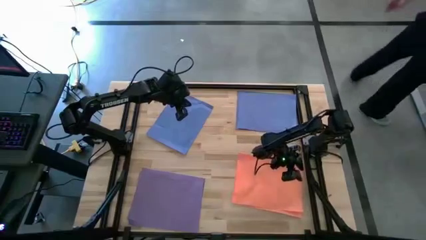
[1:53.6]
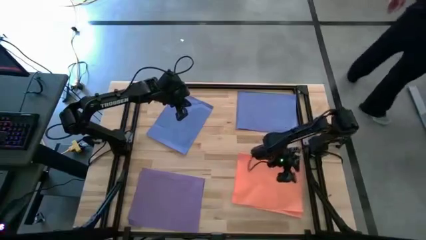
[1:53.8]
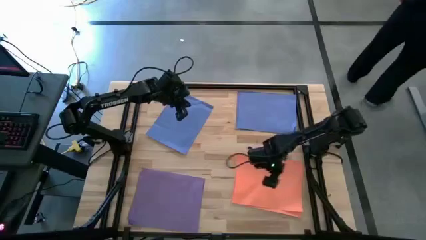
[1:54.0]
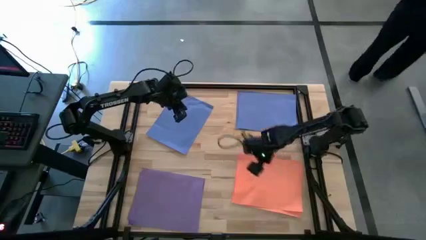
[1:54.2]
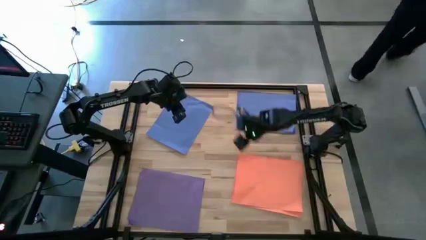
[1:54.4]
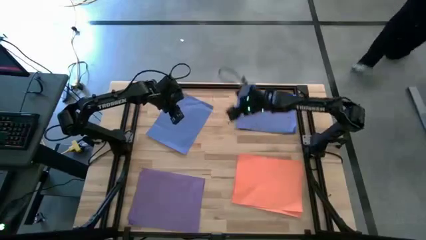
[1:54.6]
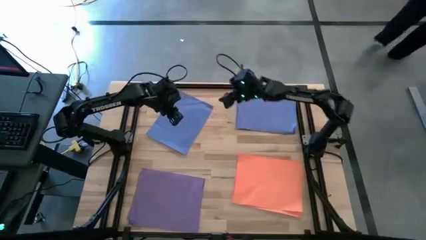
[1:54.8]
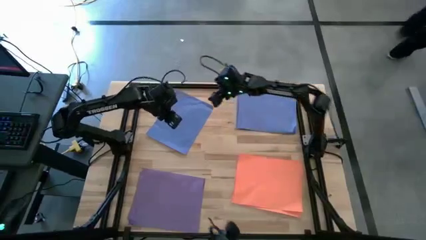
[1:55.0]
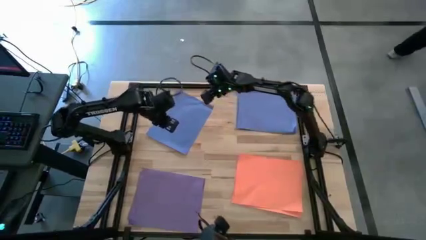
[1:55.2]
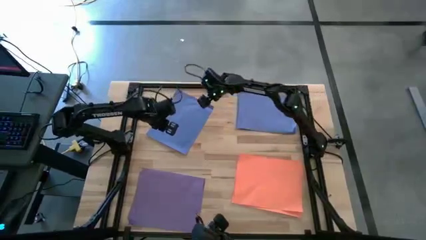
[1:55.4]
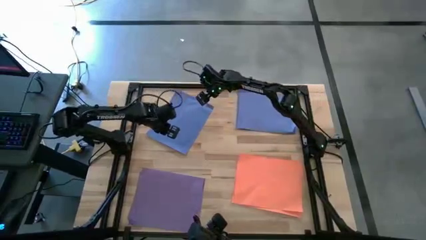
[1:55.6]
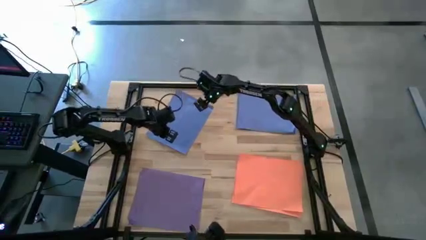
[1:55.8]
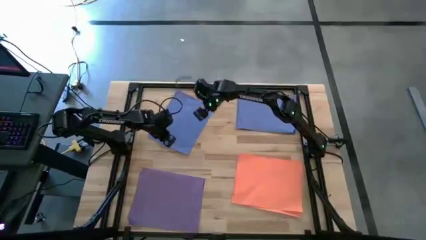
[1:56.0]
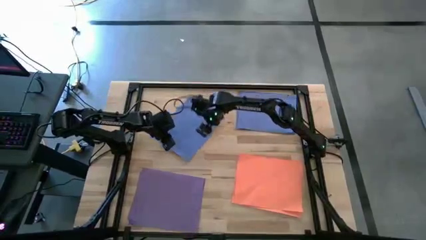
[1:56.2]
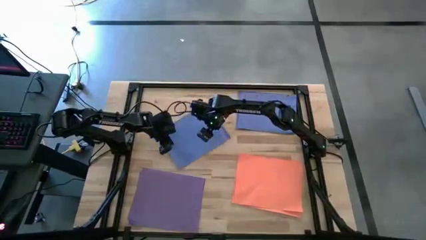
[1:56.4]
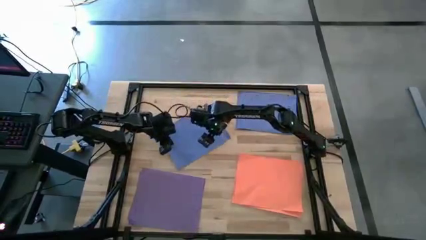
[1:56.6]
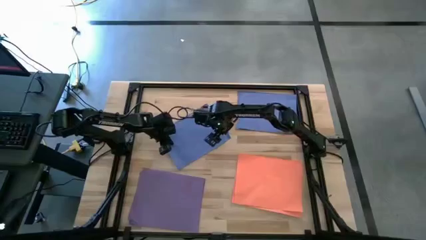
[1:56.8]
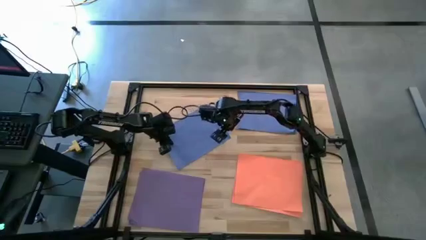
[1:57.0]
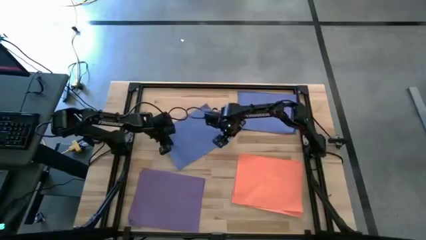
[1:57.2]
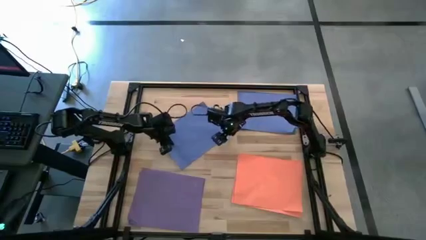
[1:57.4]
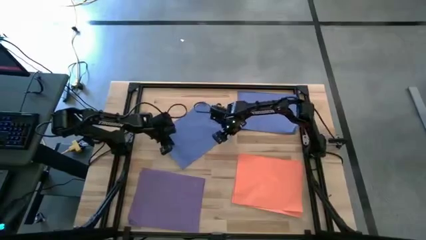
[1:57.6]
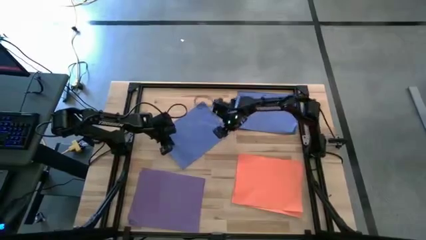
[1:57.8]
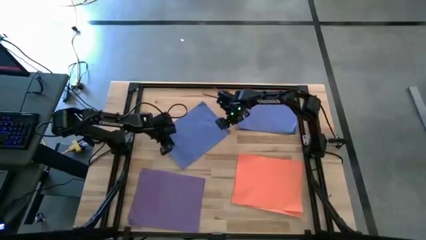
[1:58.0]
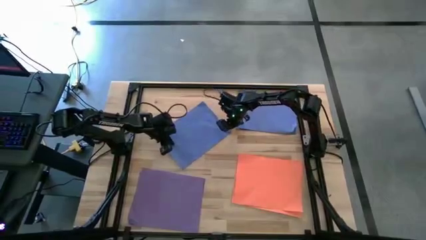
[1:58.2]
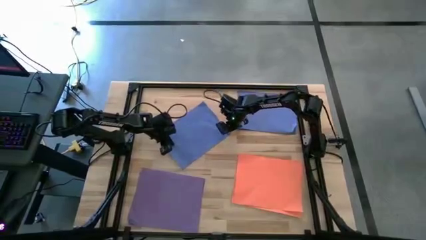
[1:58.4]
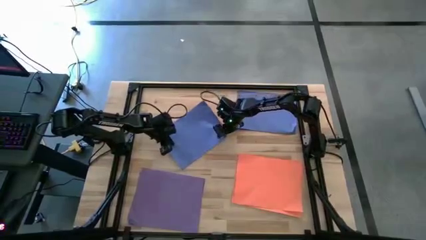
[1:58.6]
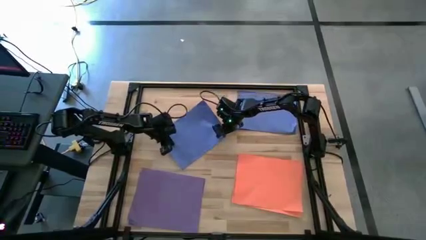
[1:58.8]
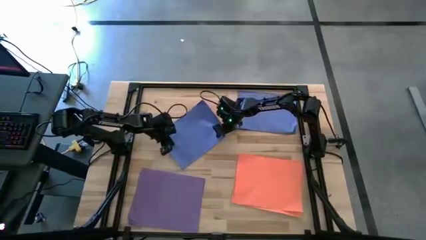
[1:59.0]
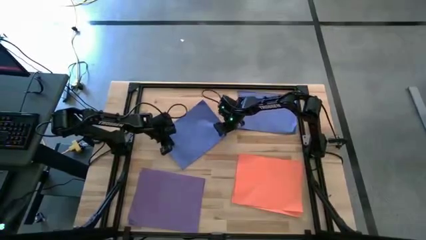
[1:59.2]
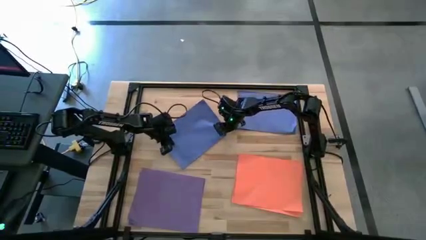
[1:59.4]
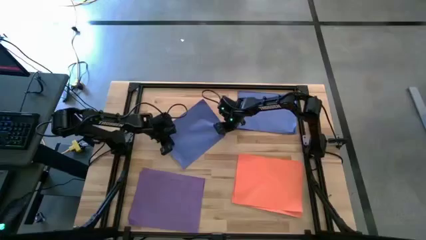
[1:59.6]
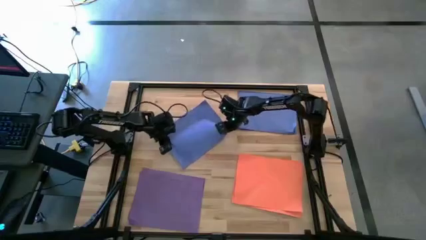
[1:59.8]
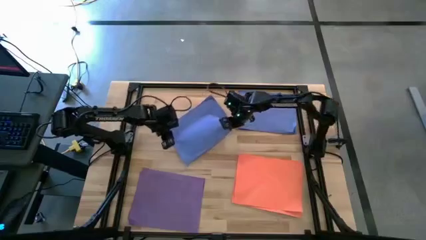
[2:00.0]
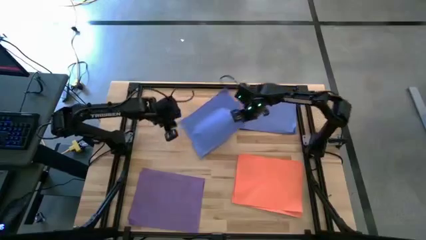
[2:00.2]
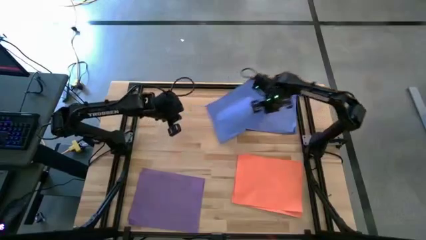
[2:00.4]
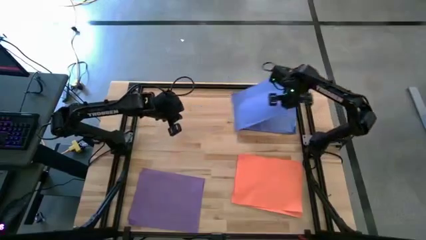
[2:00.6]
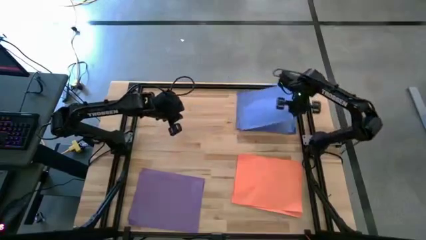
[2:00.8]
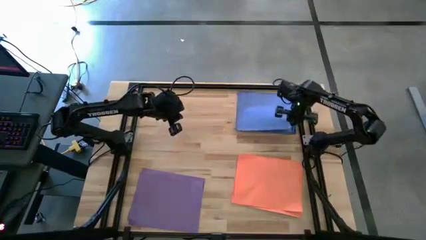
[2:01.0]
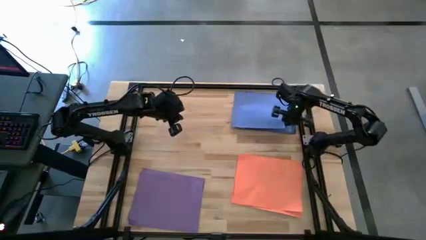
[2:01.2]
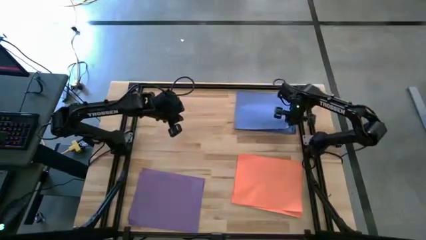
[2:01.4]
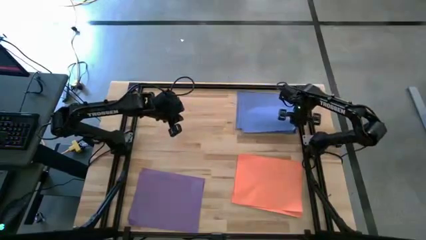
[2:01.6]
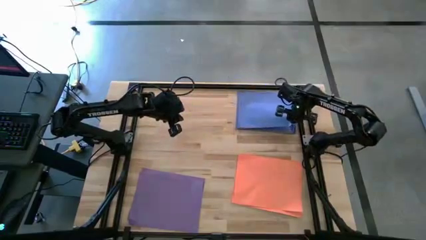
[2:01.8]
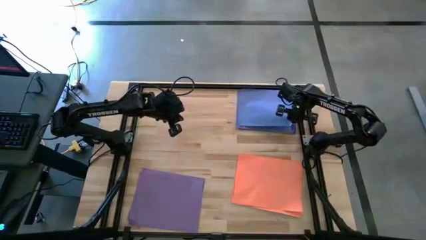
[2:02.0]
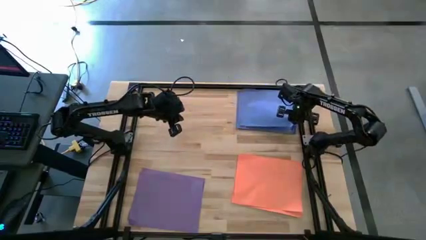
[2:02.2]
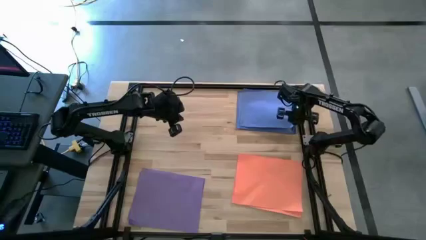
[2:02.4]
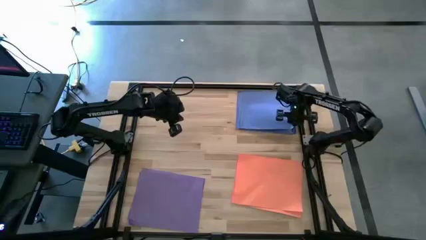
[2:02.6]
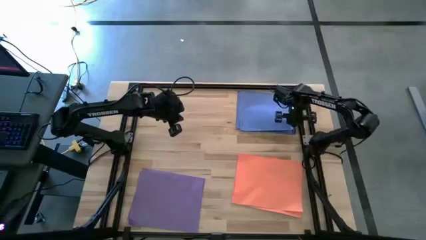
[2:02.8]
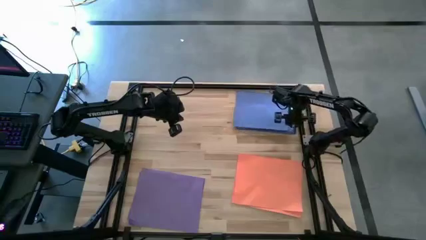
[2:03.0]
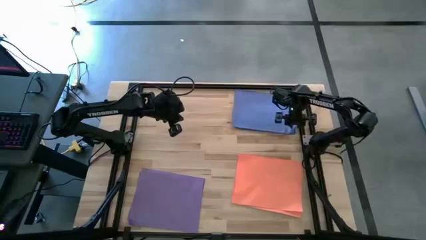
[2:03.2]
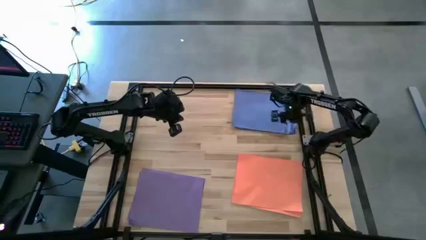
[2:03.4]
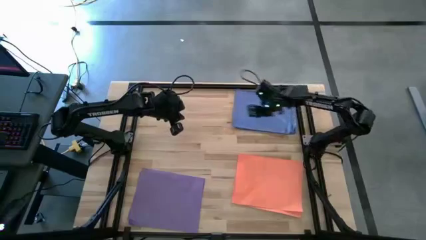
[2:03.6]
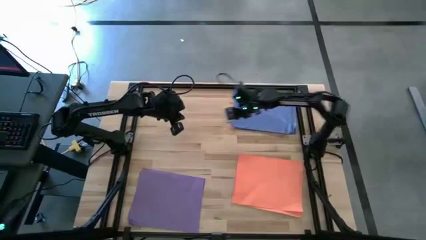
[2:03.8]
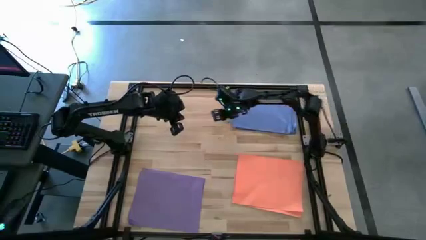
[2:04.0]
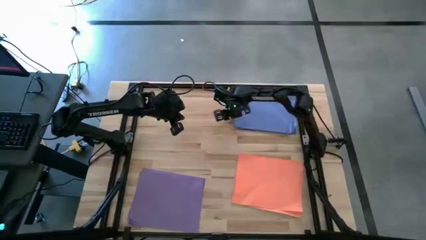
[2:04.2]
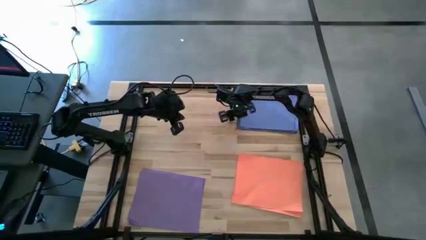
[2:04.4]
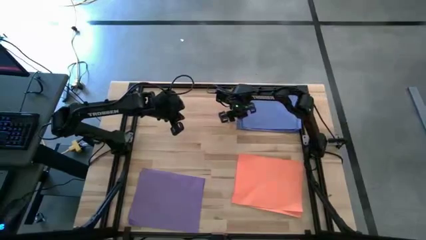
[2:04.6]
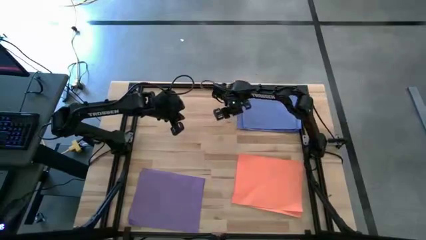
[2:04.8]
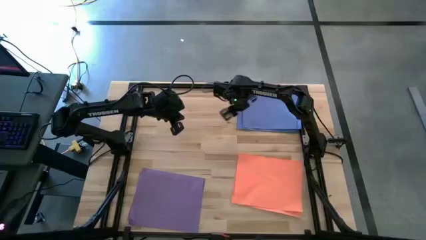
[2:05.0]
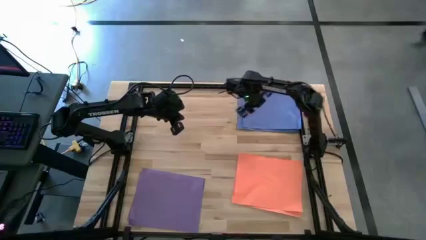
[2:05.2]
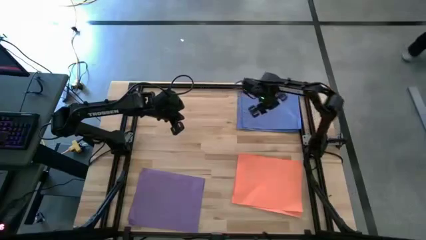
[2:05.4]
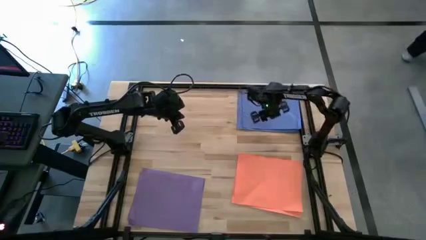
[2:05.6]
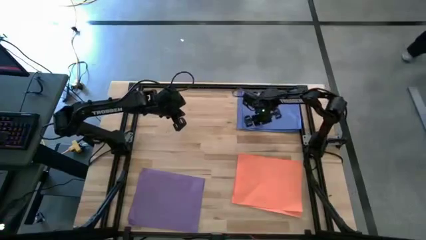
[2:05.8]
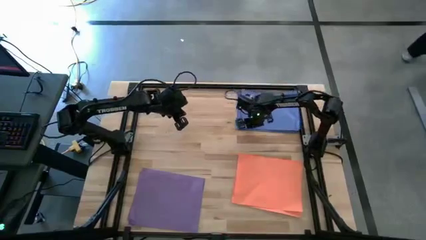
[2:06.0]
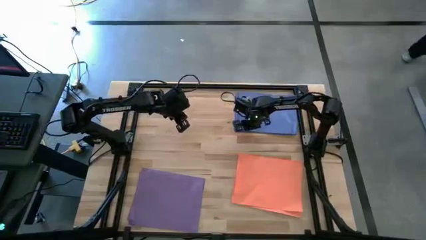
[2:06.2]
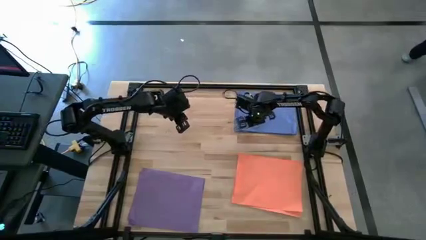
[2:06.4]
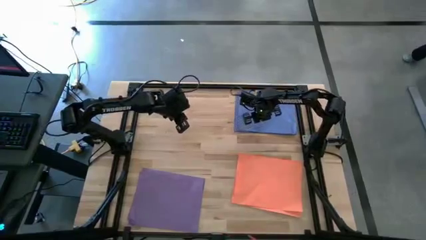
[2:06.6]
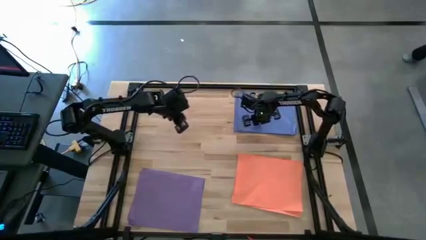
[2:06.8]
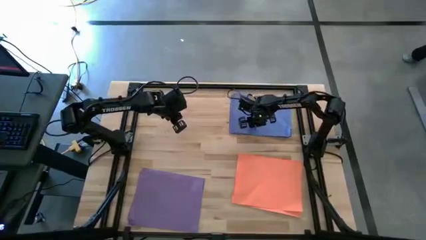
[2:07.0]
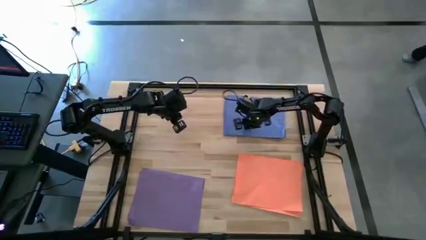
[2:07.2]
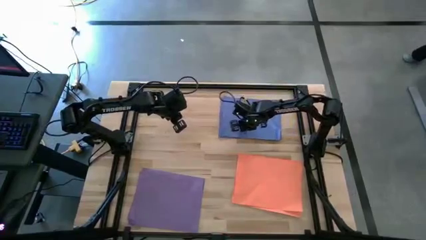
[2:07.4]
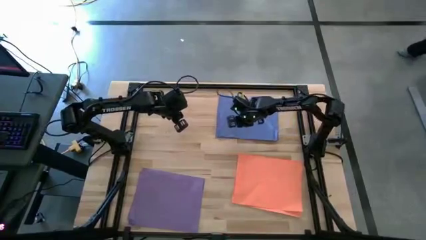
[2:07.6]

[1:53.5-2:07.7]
Task: Organize paper
Stack the blue colored paper on top of the blue colored paper

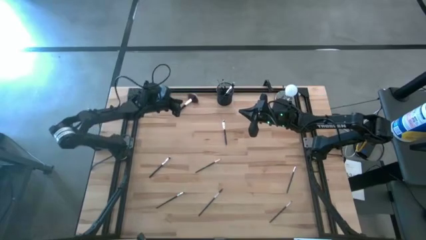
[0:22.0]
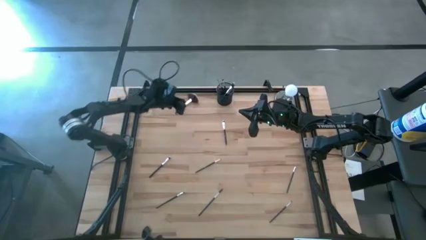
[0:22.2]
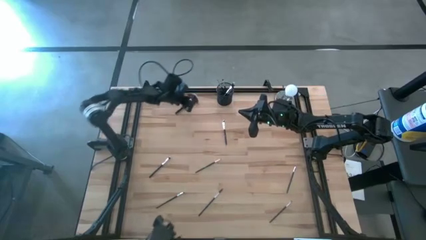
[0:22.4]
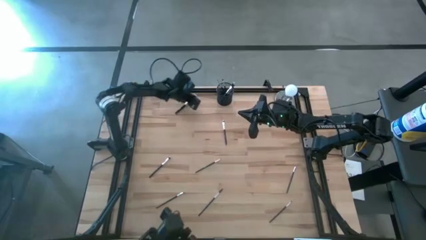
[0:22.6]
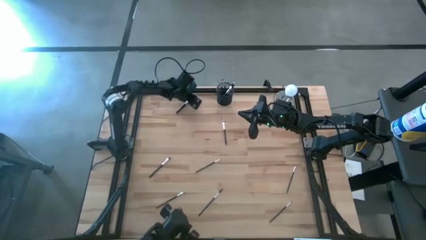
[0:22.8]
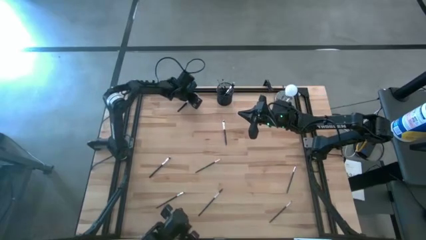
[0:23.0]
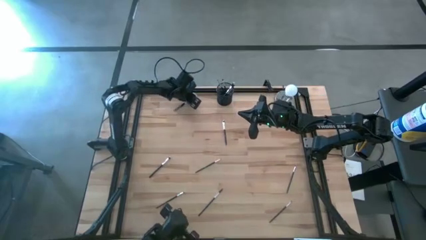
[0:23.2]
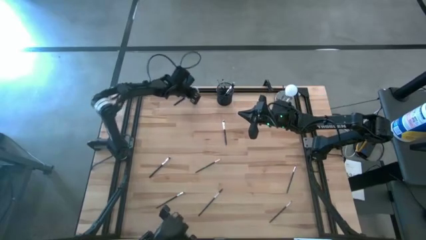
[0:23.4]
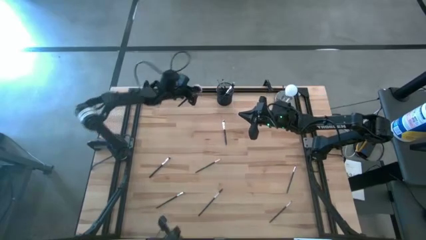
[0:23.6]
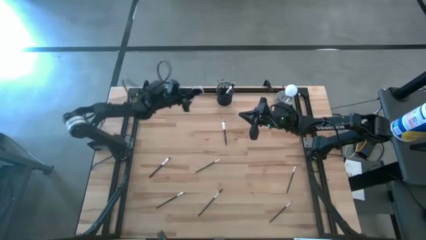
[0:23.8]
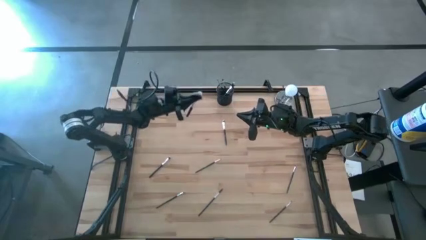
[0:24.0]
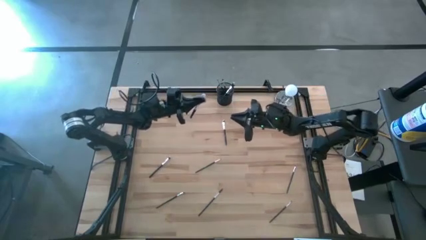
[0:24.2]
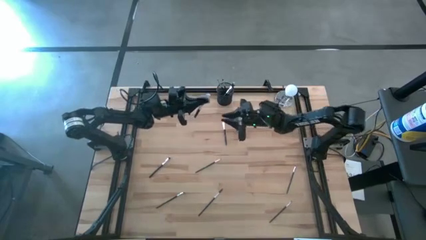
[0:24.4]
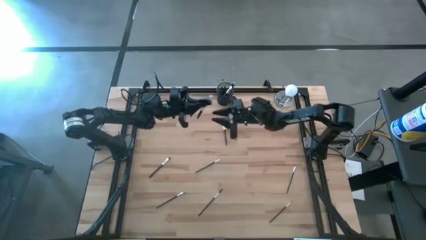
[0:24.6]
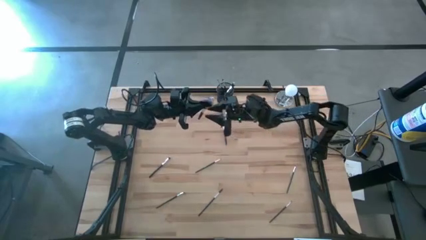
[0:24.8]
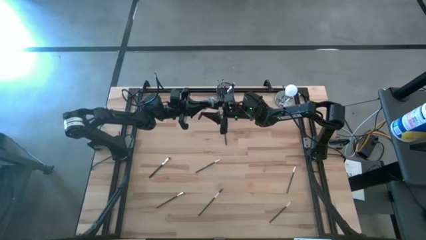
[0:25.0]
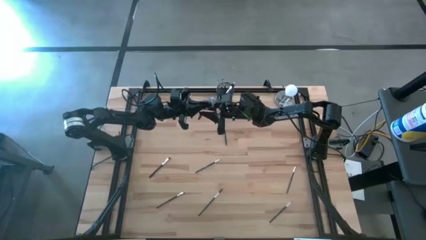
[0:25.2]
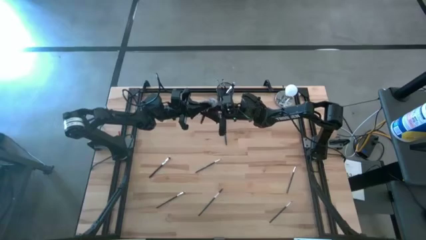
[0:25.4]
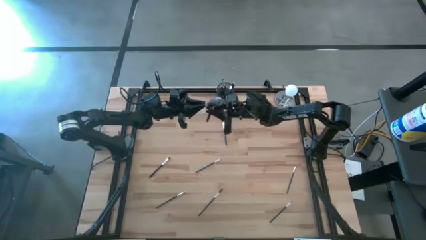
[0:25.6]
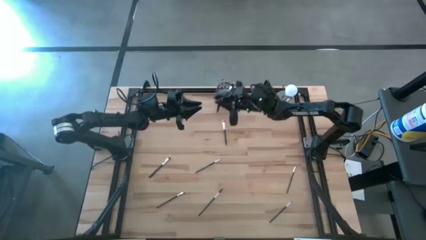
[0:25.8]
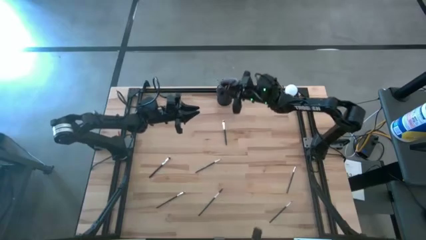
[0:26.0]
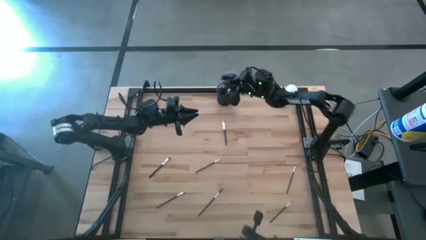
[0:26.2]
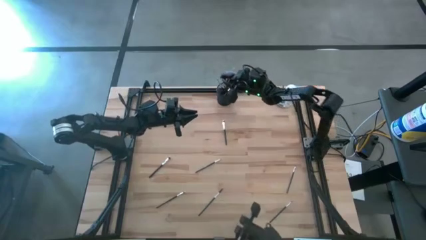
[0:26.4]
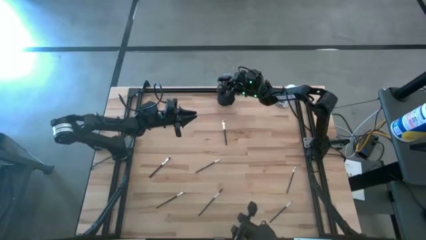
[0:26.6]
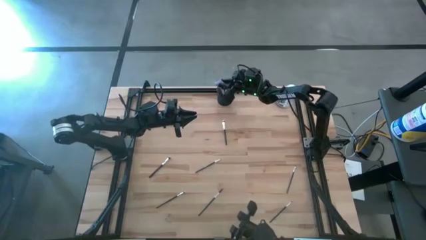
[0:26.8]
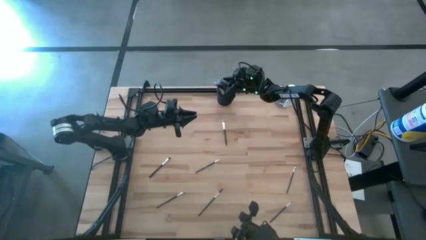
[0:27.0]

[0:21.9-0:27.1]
Task: Put items in baskets/containers
Put the black highlighter brush into the black pen holder
